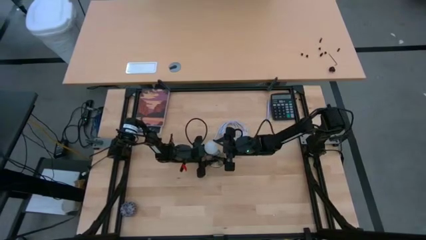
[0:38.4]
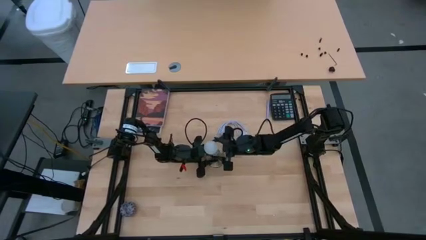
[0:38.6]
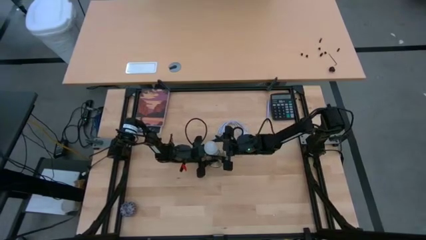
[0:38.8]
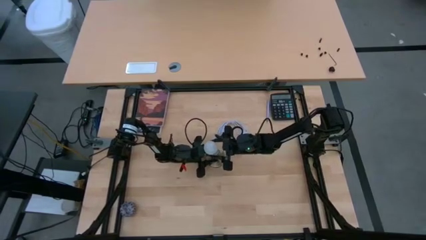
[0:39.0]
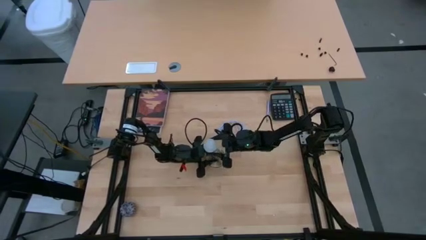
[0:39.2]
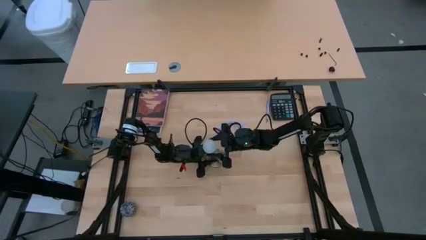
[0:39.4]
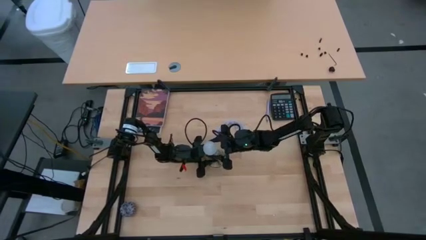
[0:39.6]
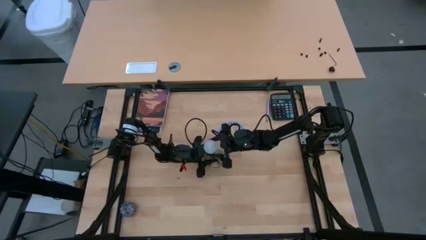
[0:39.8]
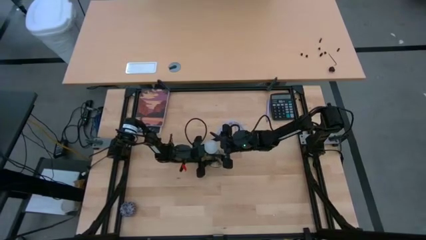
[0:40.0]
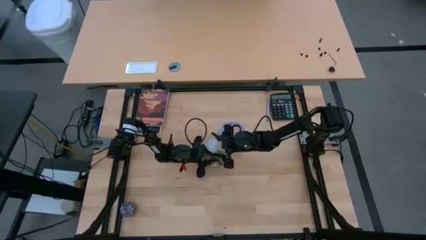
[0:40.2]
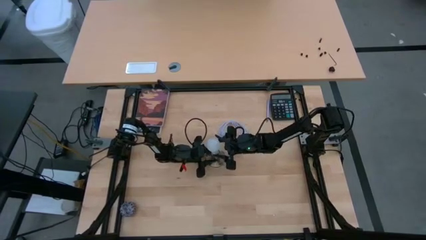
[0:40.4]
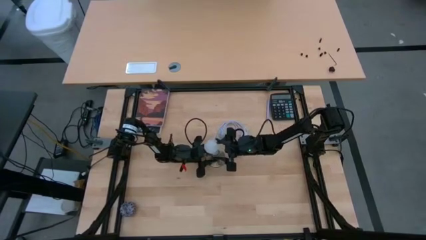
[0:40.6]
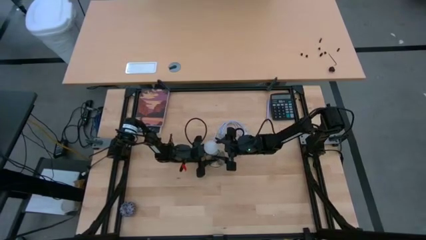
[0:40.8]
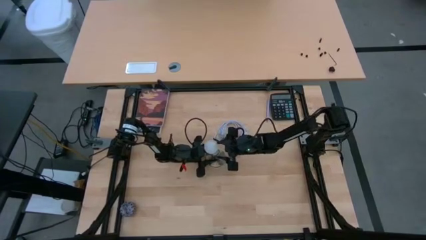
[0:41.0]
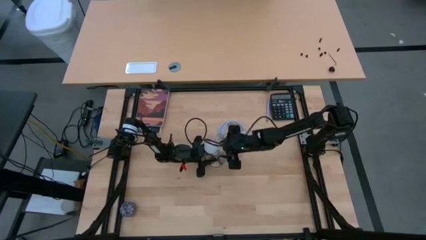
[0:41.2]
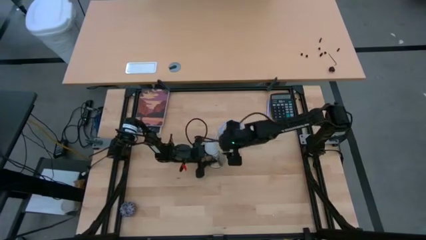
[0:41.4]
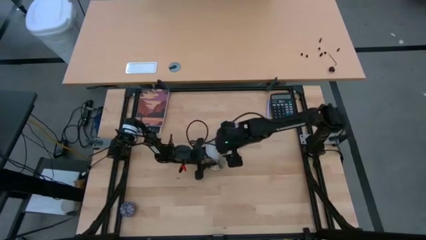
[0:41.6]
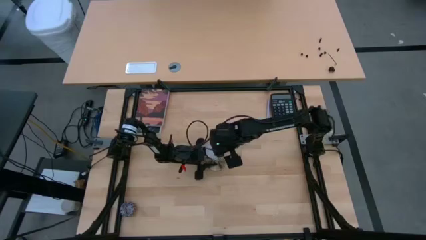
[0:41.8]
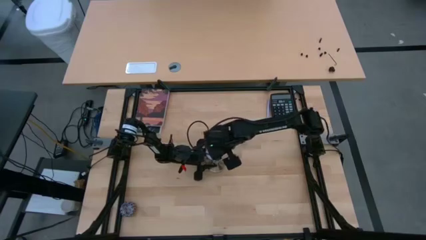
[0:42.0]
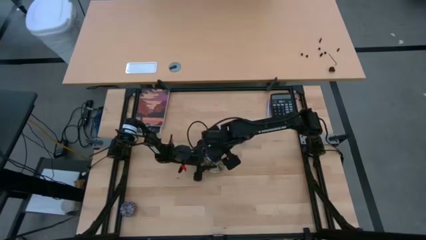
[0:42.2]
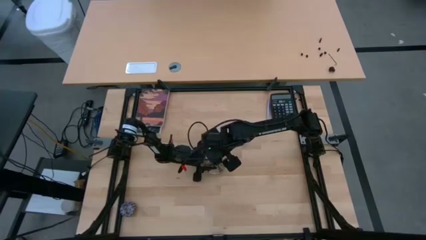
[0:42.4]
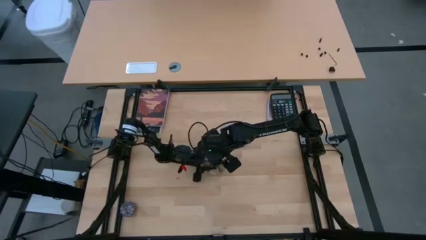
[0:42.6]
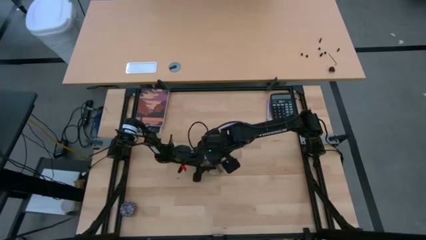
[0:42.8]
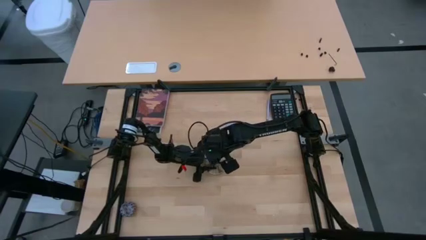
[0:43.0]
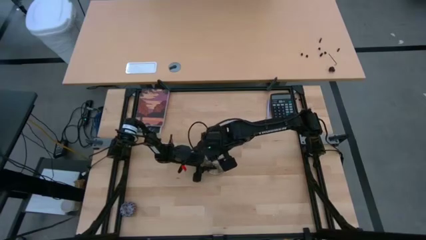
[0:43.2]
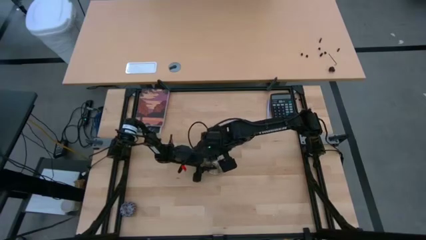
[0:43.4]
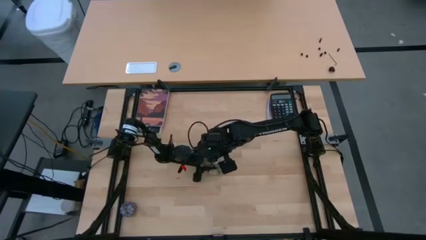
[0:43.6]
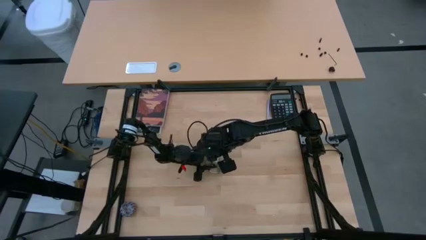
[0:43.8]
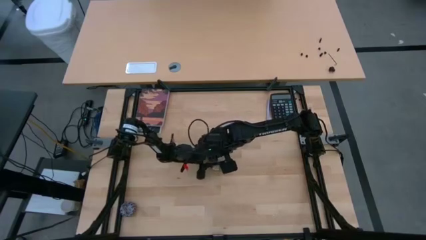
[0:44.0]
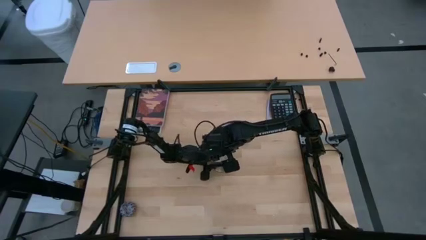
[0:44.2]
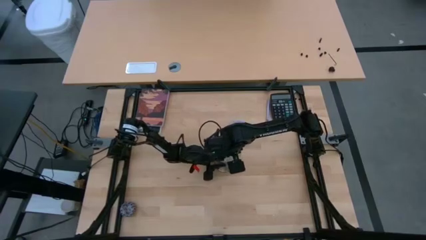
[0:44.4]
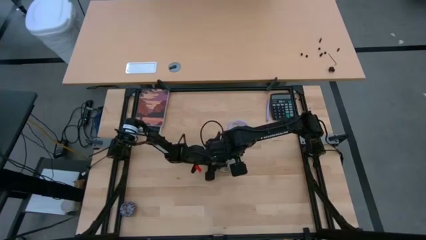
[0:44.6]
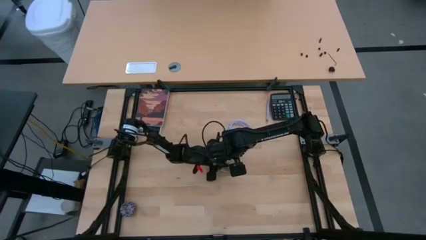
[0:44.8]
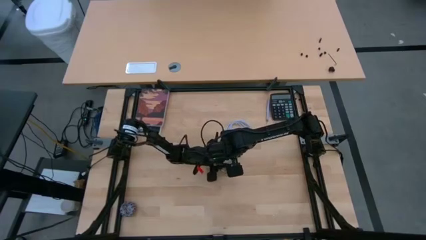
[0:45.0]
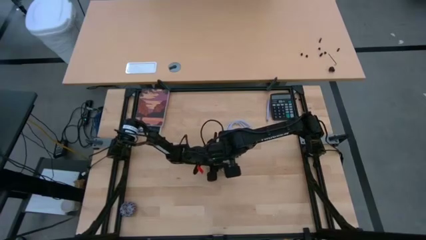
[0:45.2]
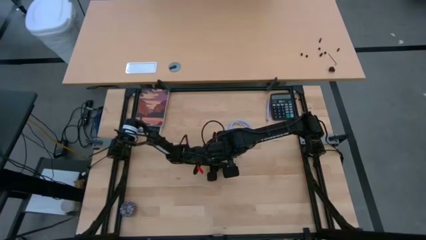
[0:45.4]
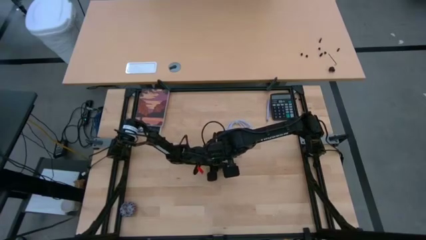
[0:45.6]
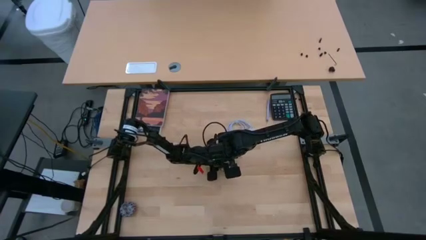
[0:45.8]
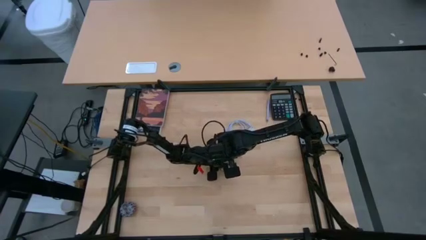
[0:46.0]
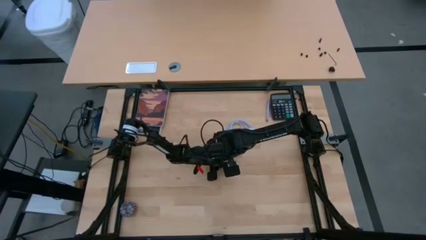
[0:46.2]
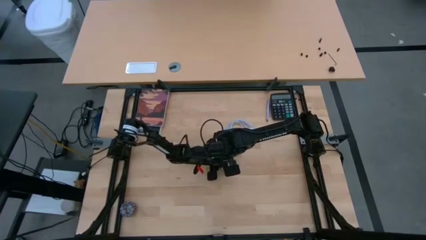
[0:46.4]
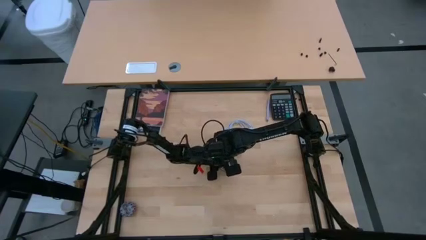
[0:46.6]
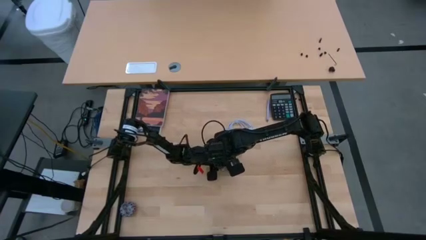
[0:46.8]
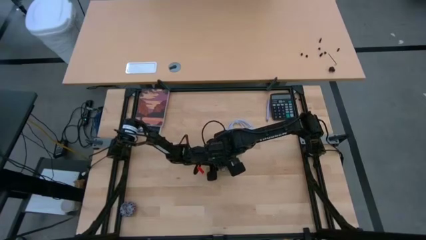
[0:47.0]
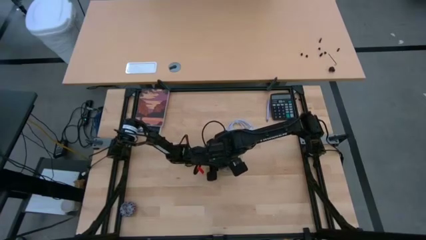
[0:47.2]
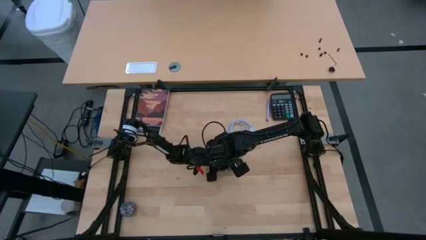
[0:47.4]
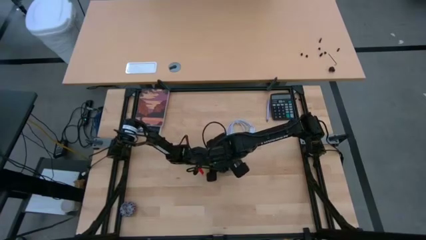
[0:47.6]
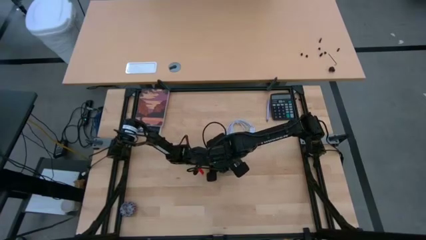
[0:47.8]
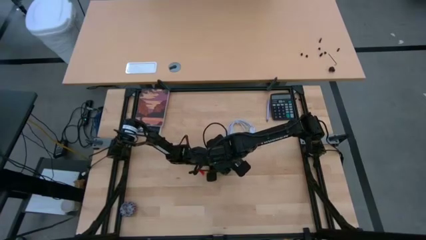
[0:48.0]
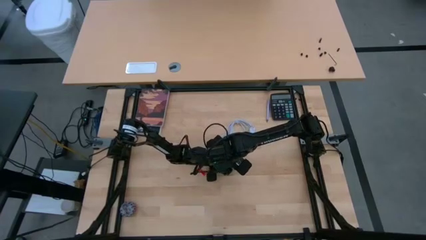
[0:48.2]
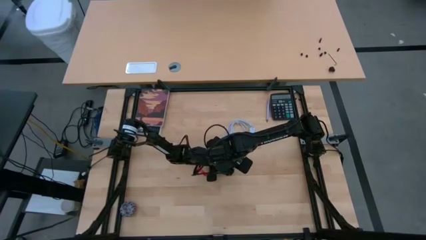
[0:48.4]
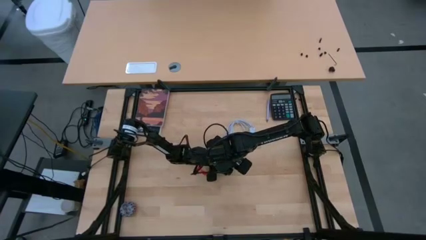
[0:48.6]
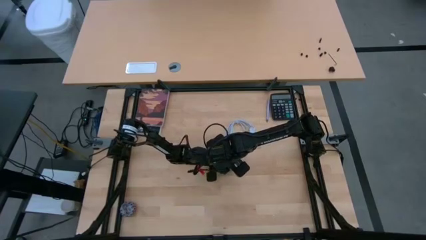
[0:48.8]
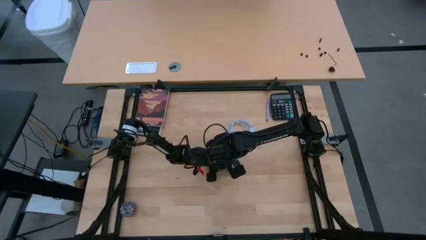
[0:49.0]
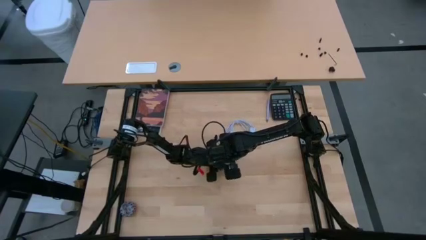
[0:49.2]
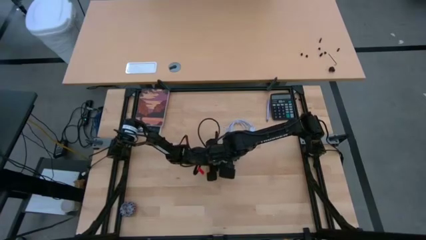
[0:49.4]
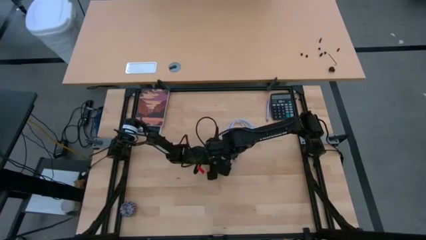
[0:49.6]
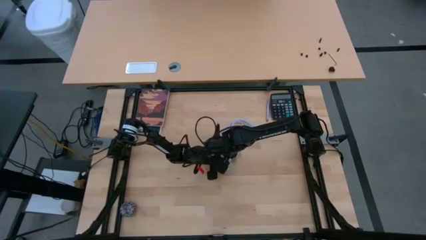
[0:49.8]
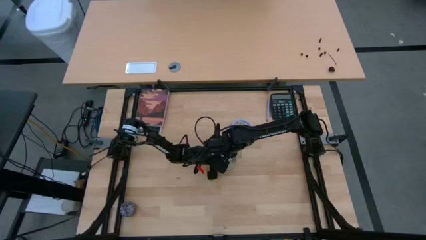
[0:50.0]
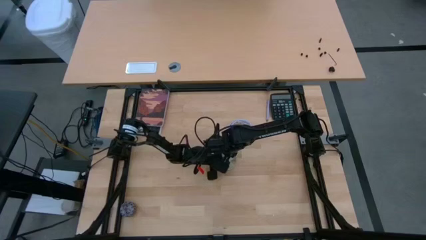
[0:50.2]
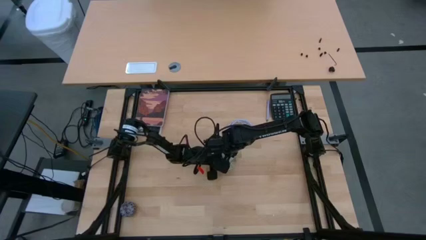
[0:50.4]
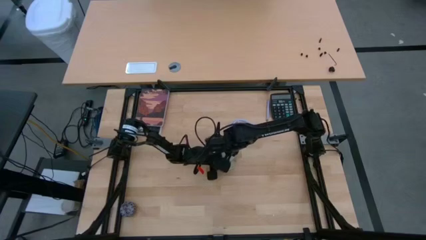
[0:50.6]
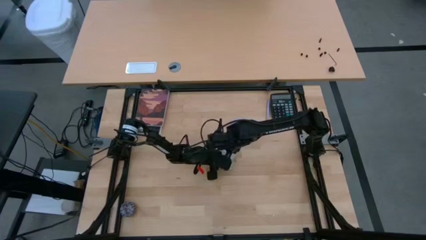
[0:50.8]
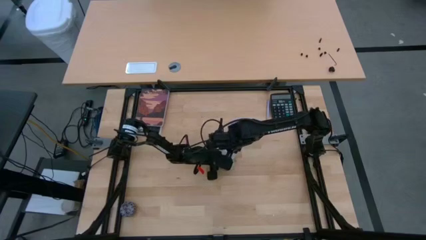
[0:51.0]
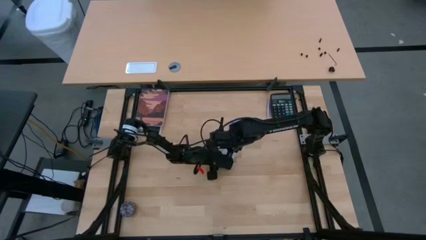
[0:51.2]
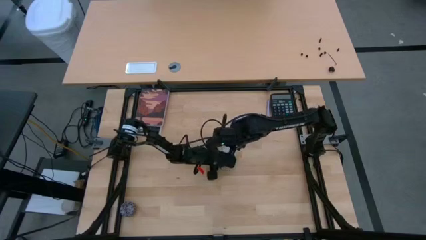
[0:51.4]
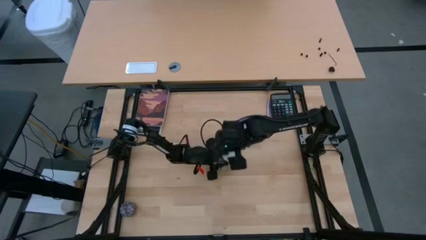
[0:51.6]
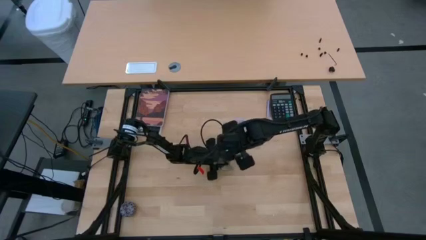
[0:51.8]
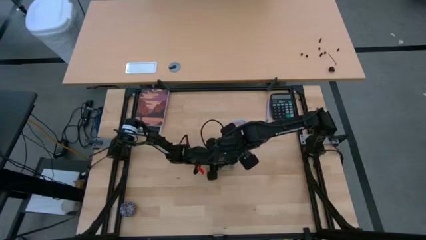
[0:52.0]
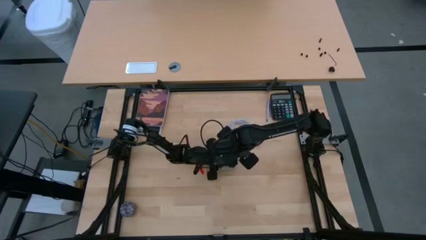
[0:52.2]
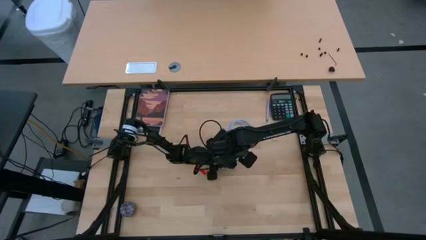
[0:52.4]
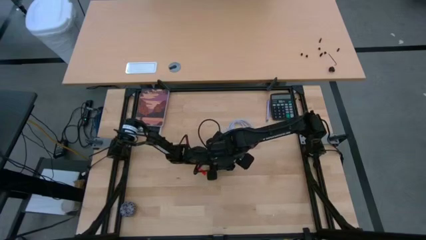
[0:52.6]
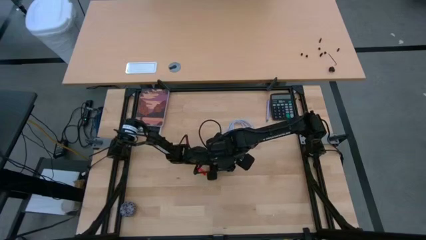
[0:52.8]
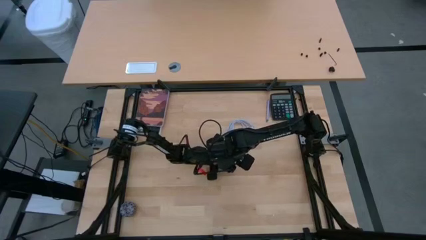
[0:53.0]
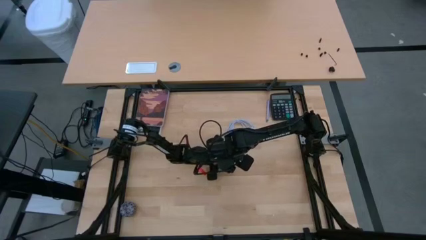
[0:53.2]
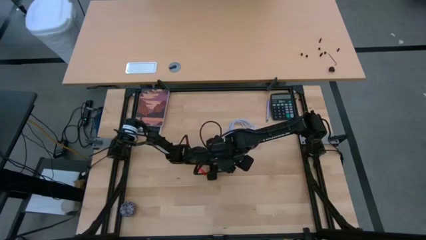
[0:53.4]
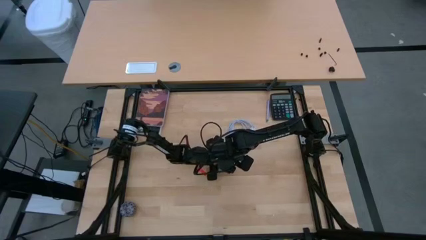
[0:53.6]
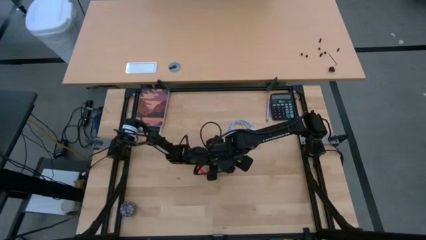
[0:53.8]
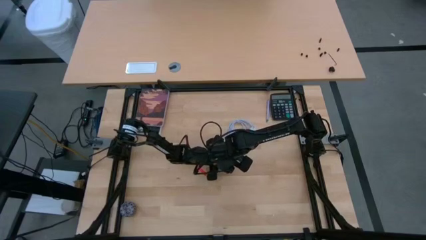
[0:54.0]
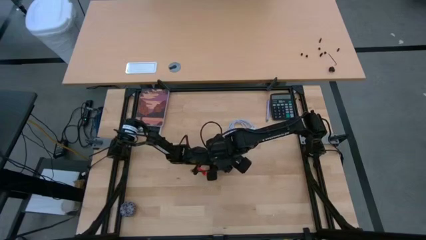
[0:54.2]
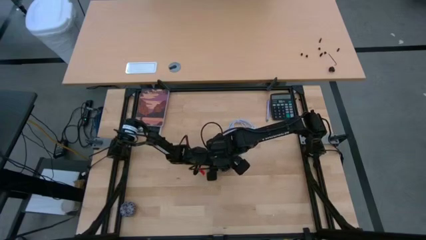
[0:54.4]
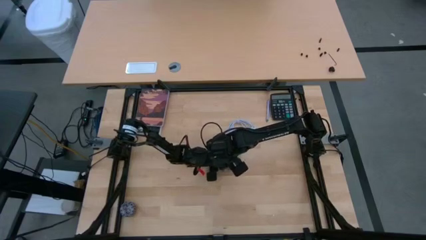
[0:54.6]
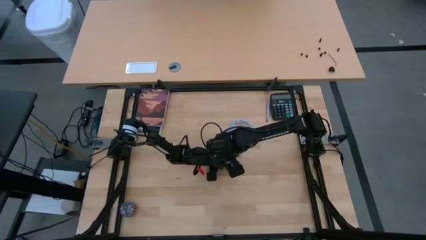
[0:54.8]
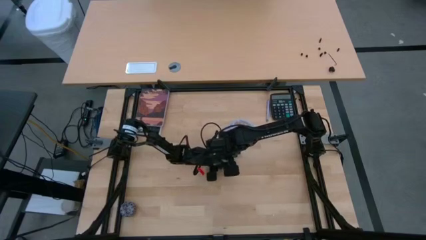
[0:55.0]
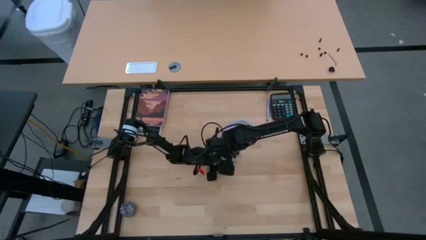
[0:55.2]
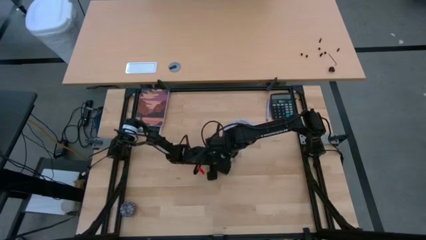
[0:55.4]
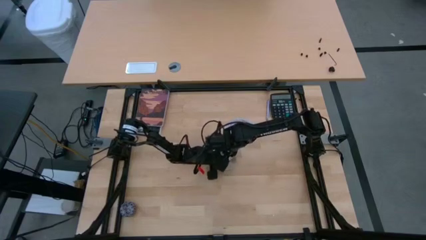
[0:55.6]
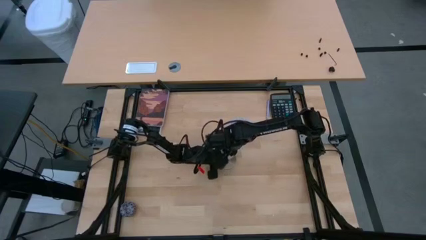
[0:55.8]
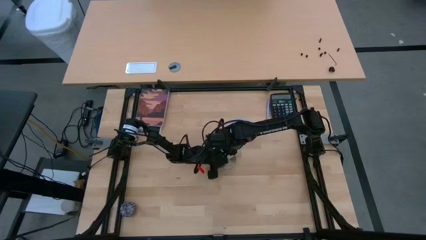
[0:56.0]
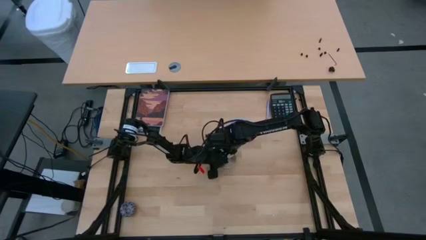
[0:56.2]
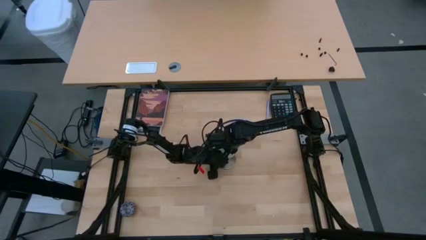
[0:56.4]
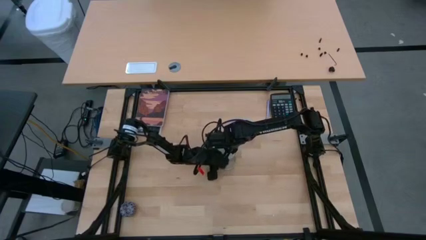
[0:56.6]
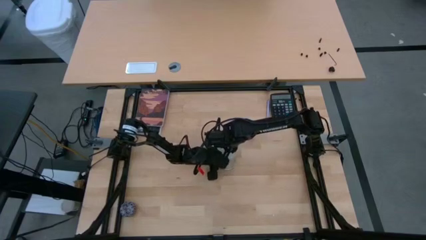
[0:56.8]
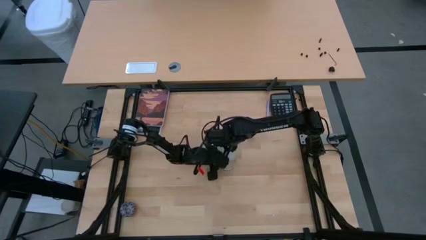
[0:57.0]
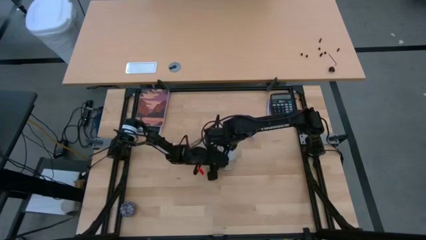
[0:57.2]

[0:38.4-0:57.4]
Task: Screw lightbulb
Insert the lightbulb into the lamp
